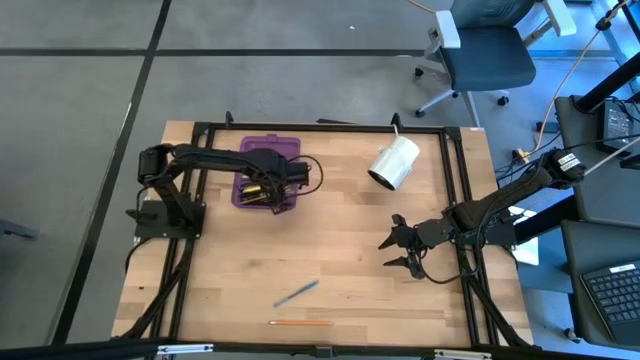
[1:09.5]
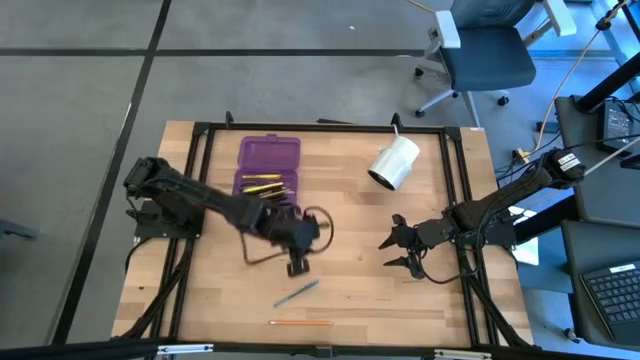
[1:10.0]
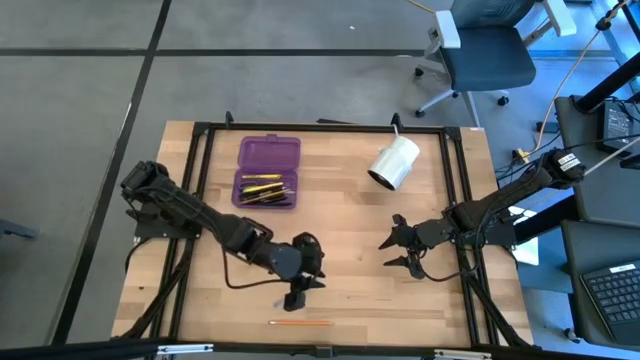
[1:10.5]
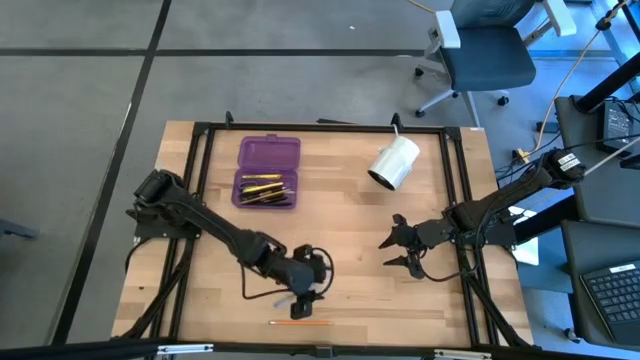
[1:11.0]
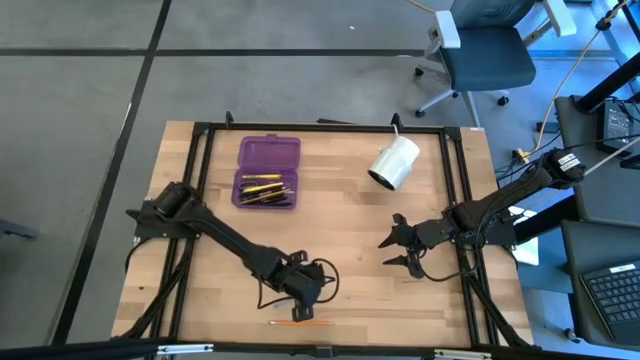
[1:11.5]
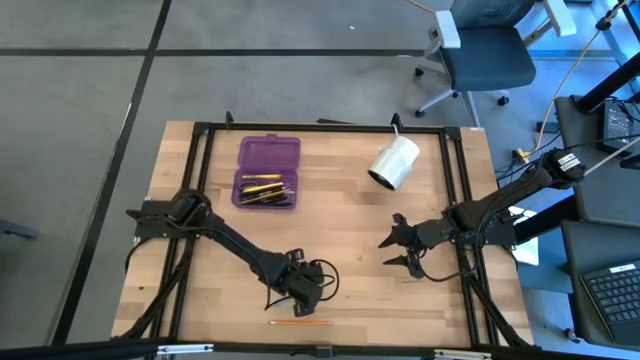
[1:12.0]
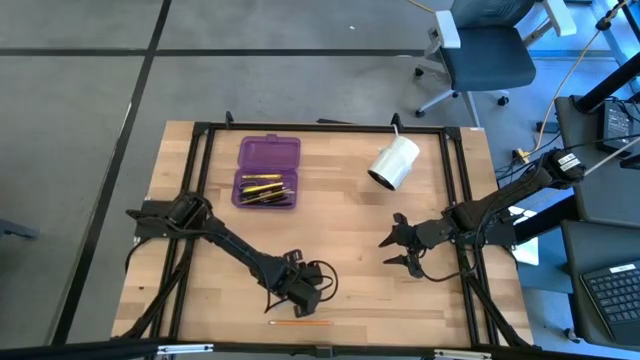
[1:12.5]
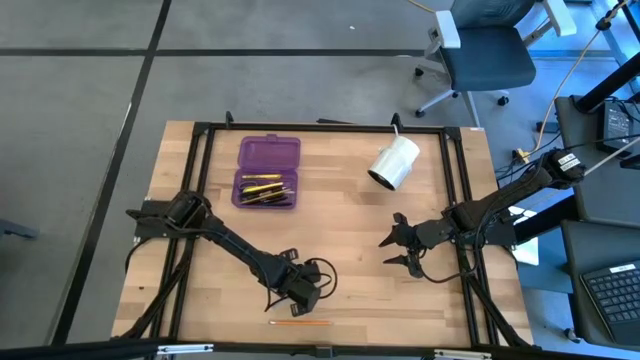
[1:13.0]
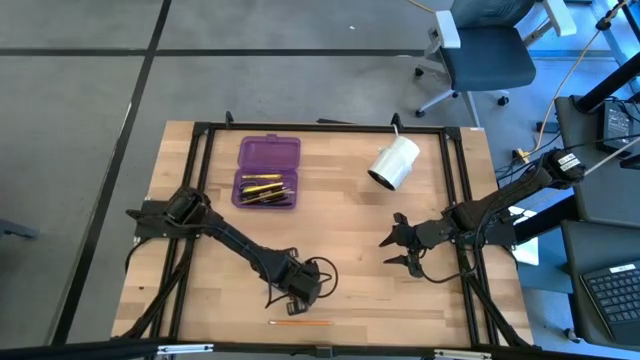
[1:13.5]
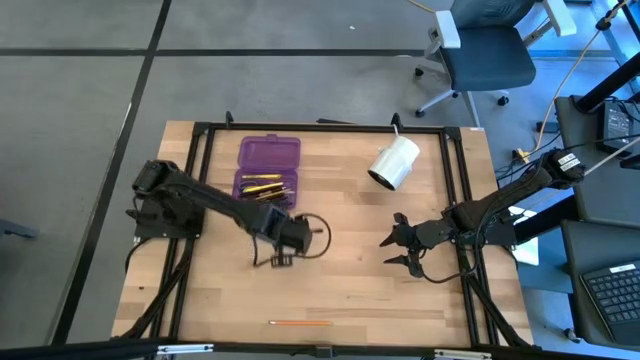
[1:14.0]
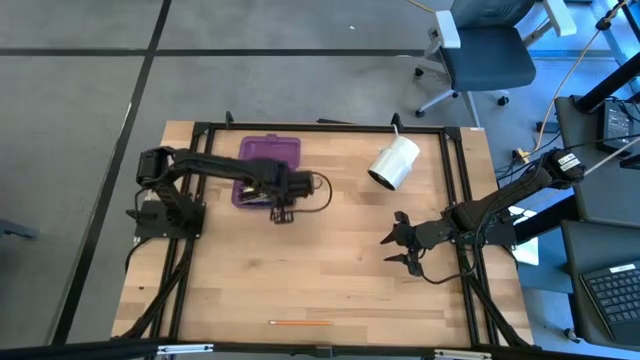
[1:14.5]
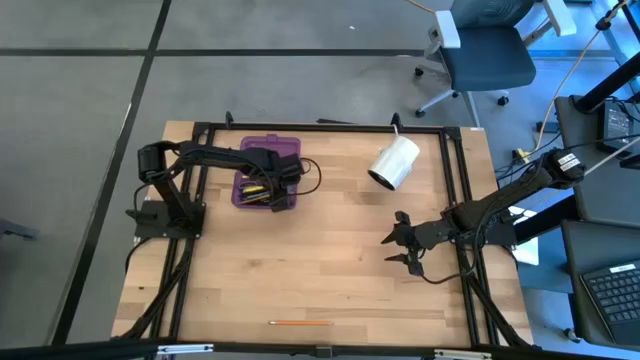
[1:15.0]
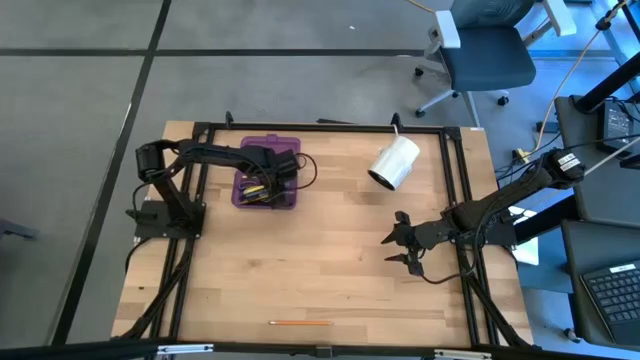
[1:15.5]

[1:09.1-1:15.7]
Task: Pick & place school supplies into a supply box
Put the blue pen into the purple box organizer

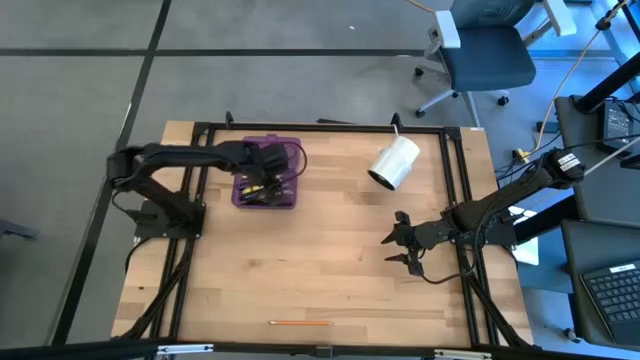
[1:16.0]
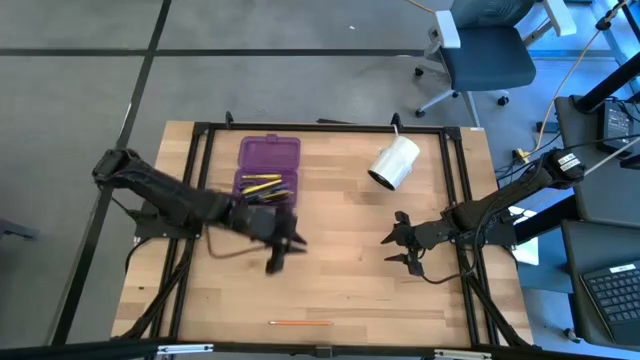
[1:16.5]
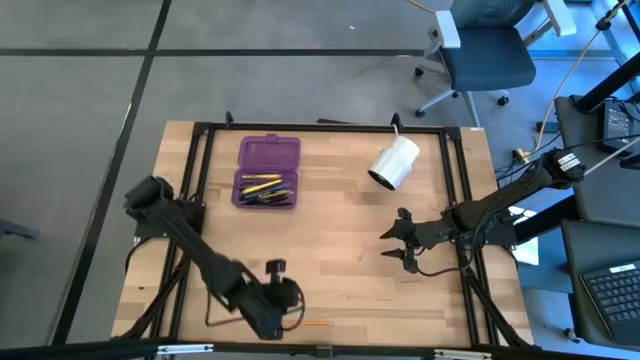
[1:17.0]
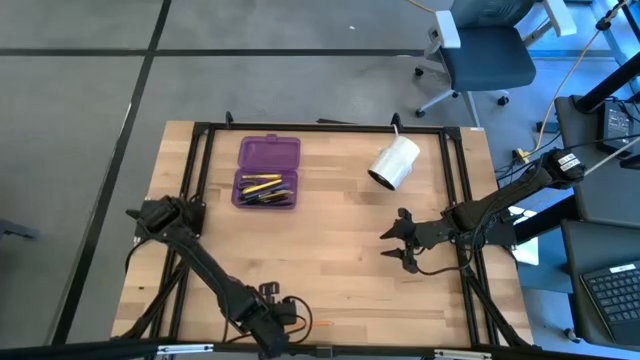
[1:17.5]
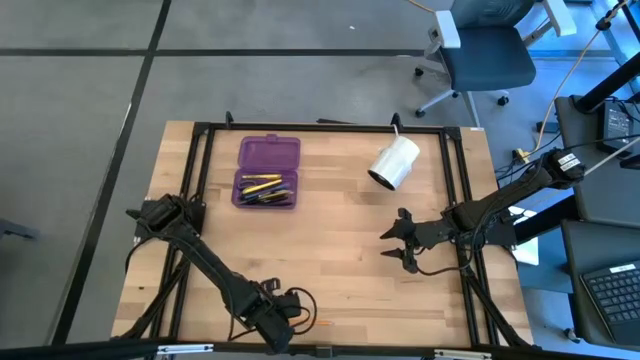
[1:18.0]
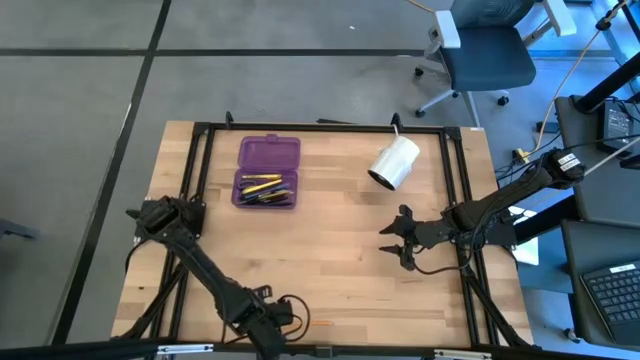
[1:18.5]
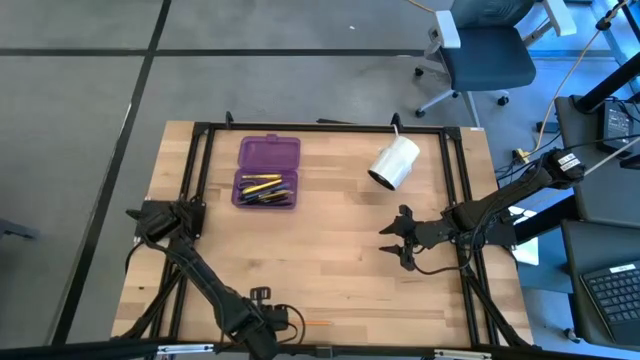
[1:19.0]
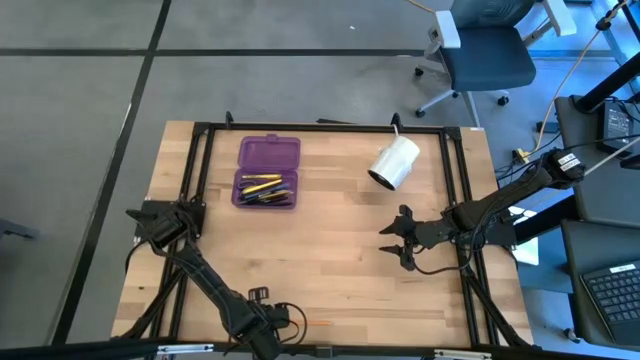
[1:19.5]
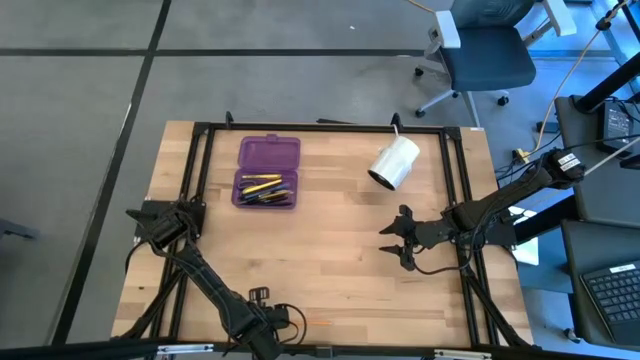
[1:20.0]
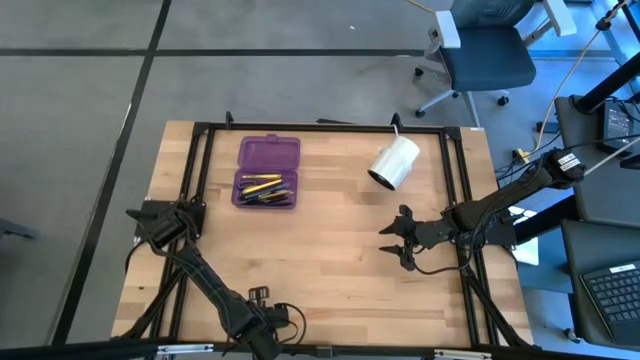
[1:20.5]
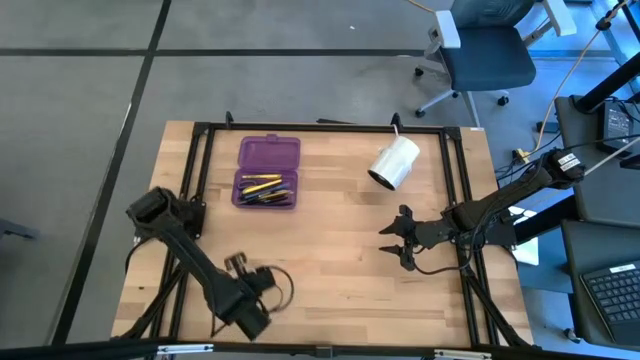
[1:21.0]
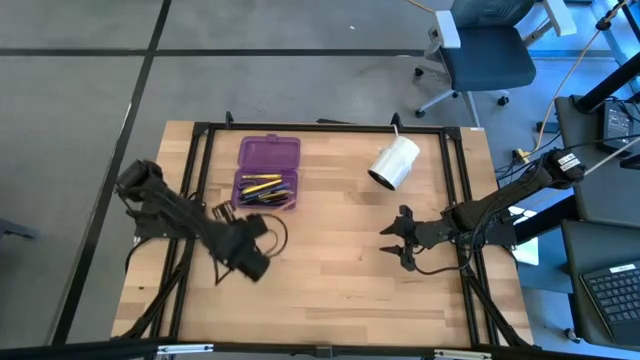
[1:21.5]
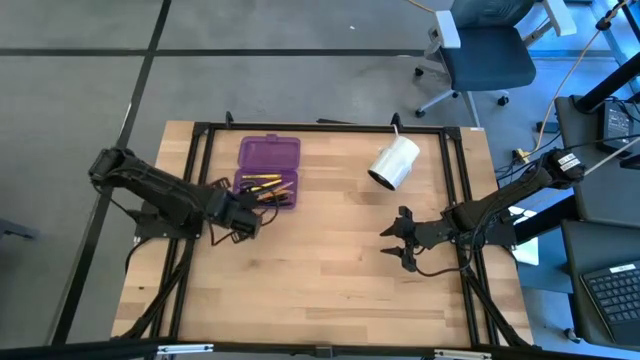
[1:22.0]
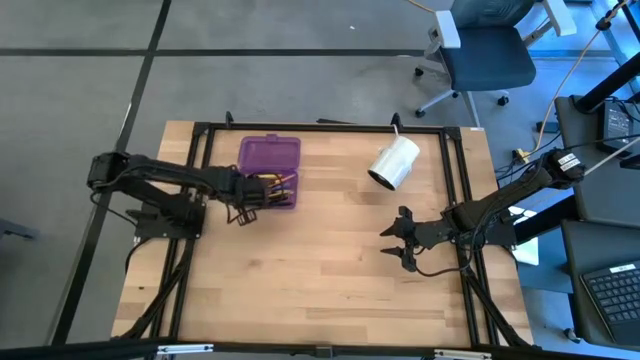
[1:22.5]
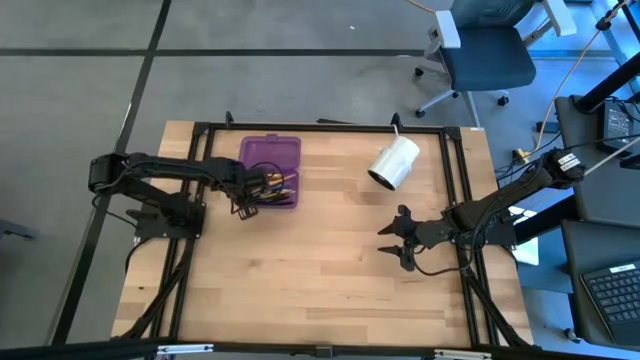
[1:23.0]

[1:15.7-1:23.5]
Put the orange pencil into the purple box organizer

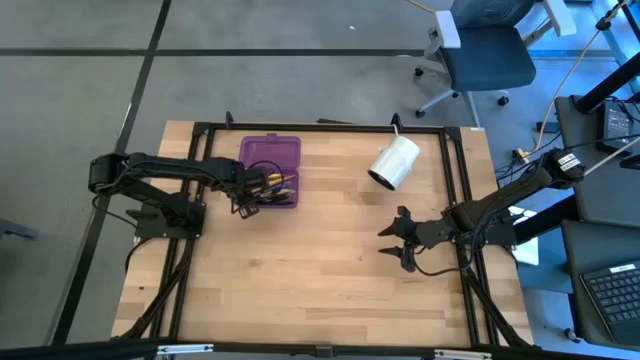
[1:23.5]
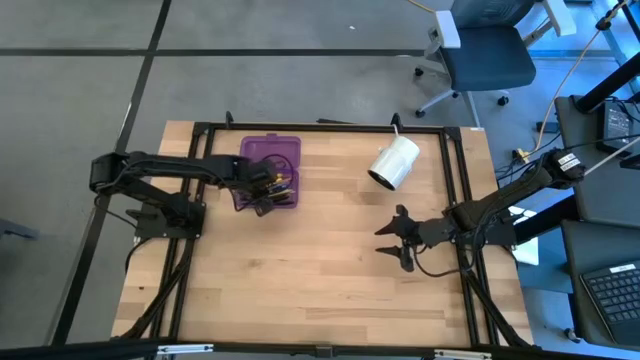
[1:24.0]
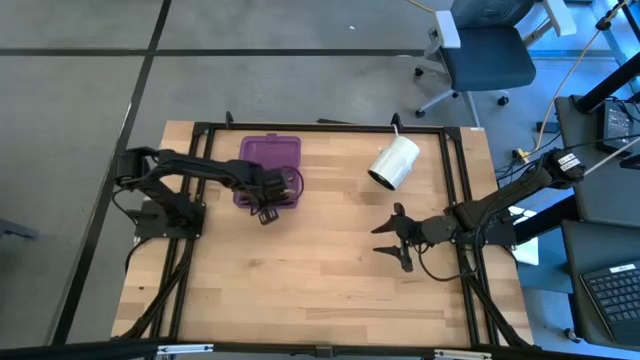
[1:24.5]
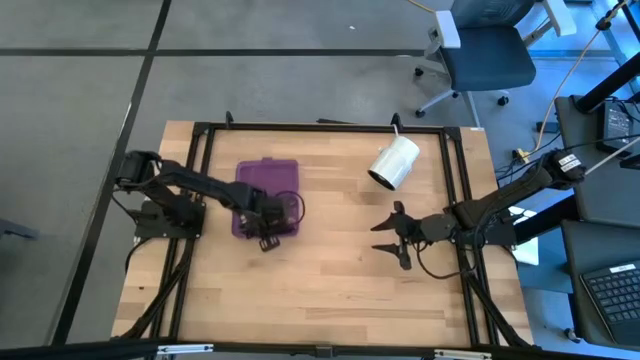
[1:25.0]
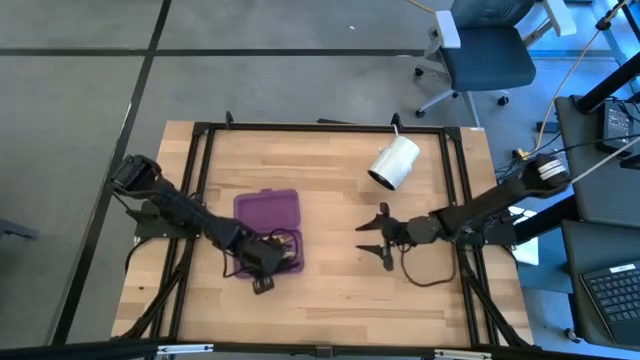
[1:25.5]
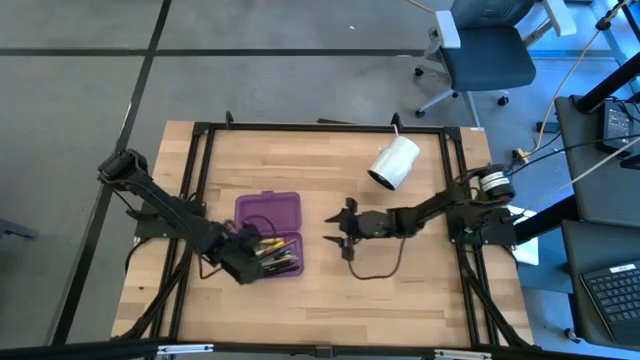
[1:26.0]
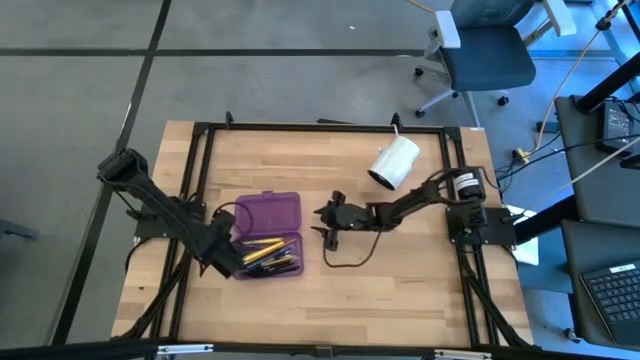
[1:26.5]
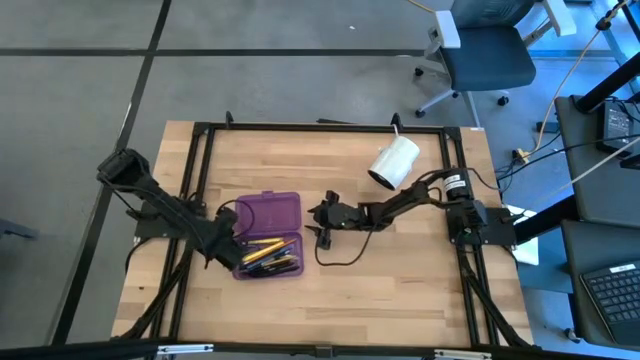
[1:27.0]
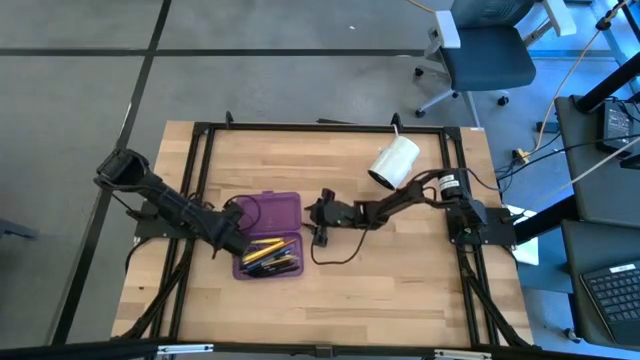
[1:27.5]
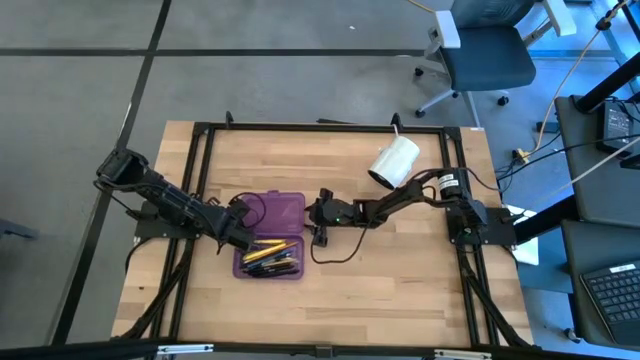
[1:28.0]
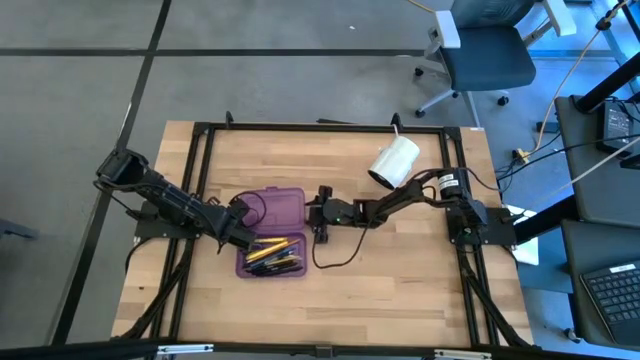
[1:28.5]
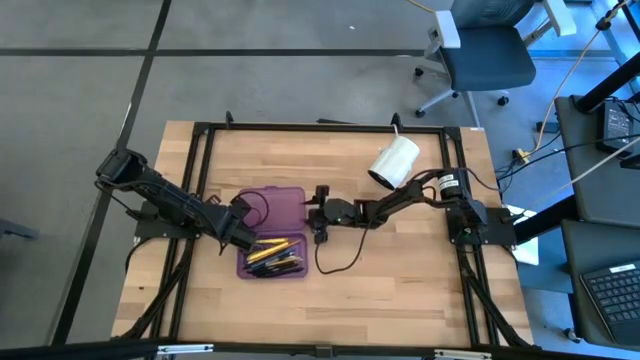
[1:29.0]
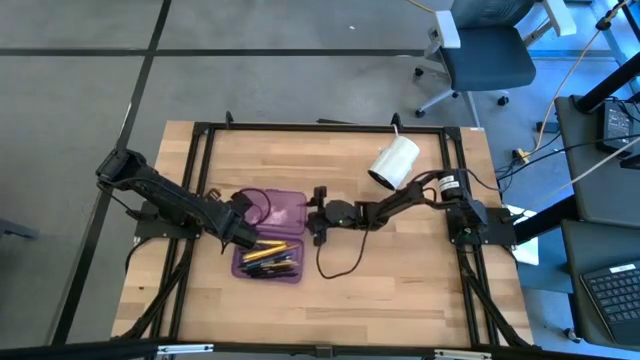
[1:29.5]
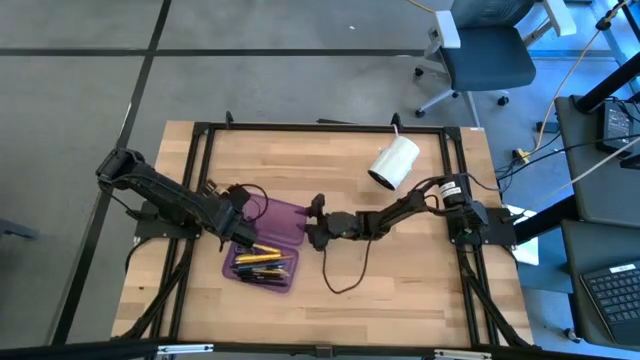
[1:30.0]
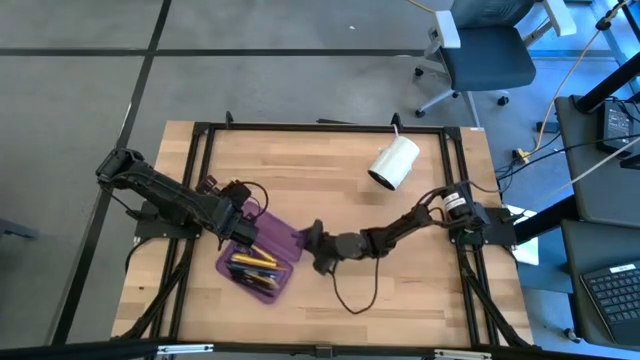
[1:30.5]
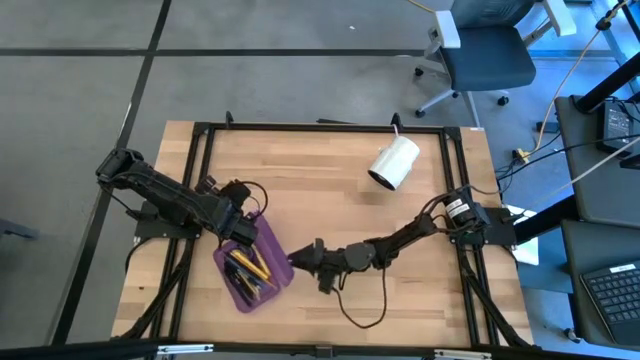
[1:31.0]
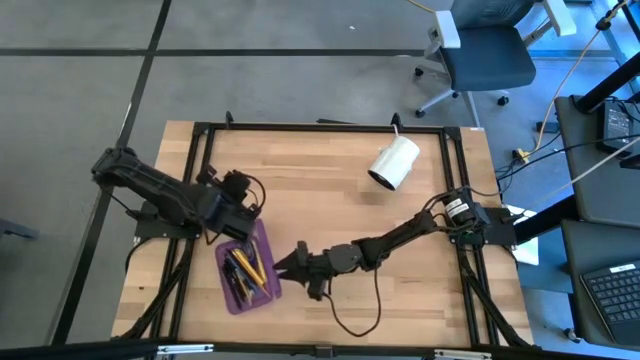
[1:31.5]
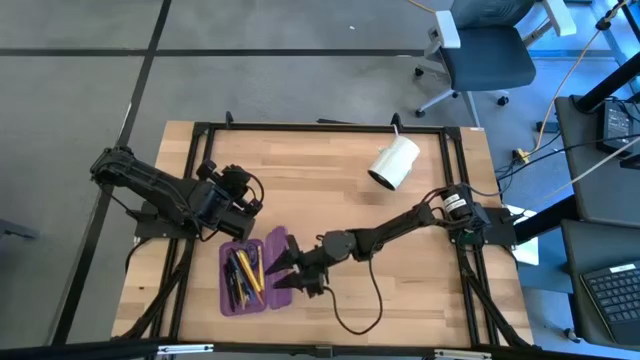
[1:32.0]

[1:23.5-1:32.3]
Close the purple box organizer
